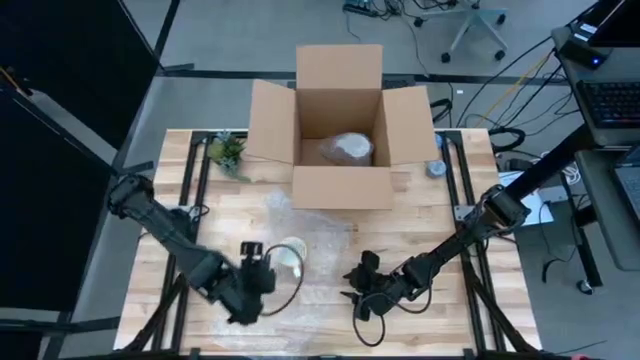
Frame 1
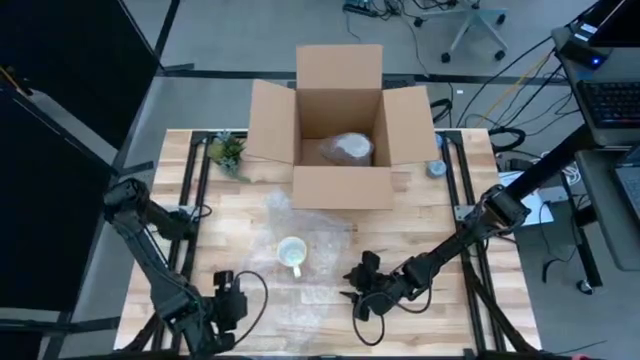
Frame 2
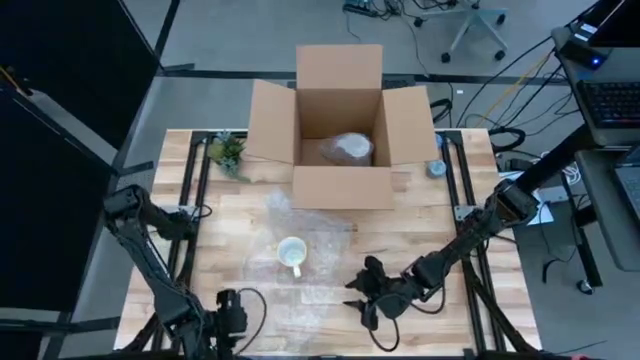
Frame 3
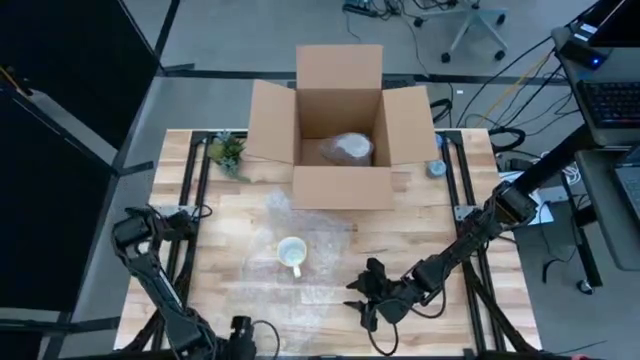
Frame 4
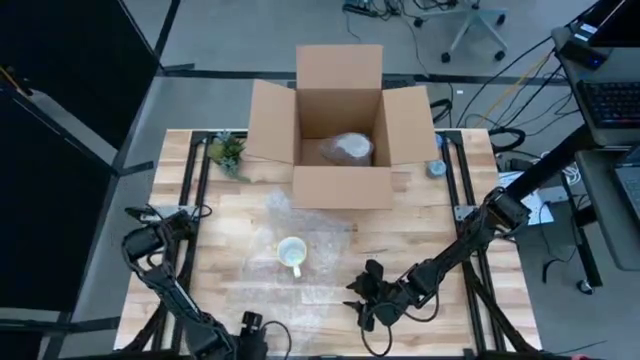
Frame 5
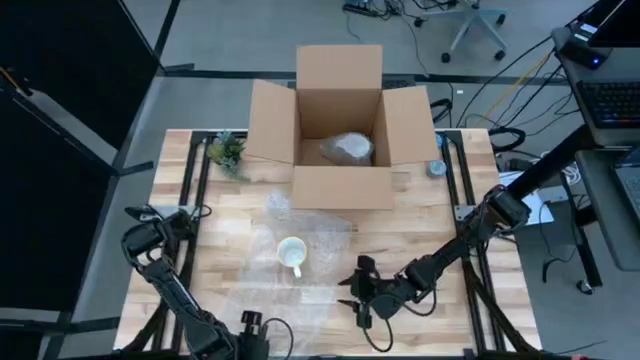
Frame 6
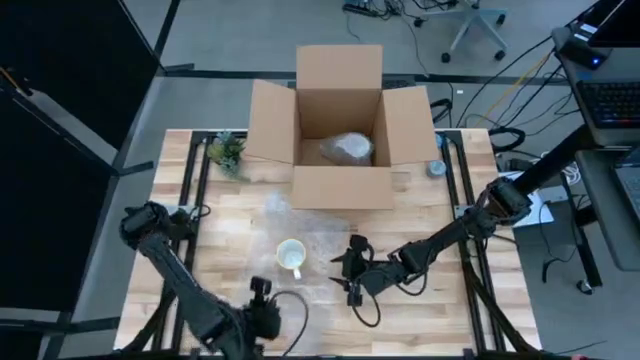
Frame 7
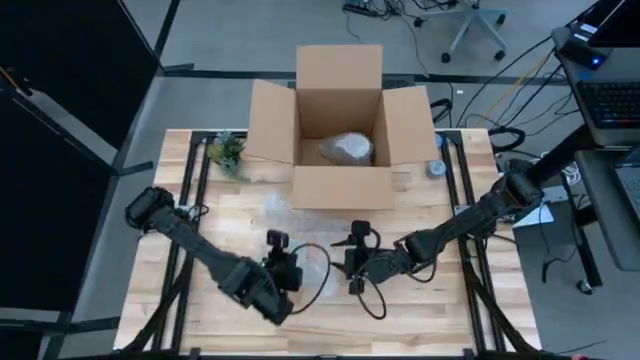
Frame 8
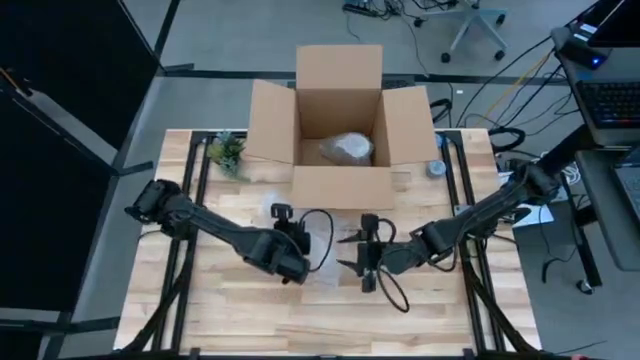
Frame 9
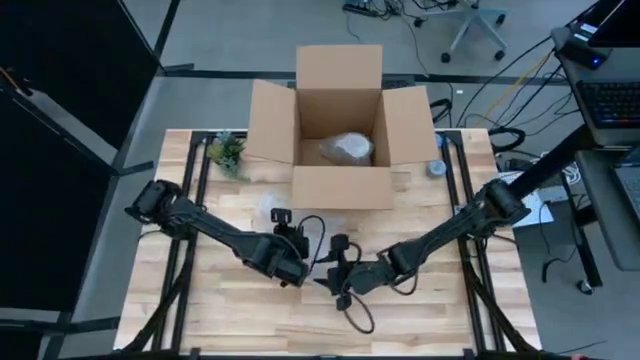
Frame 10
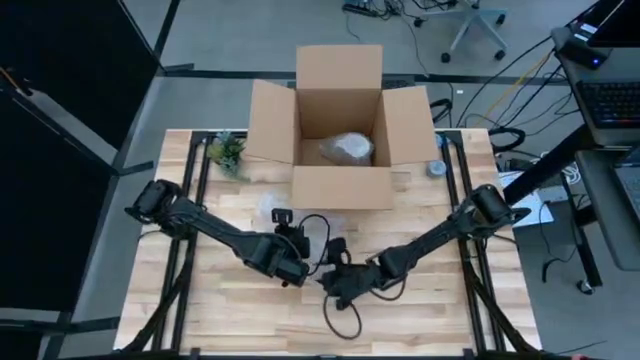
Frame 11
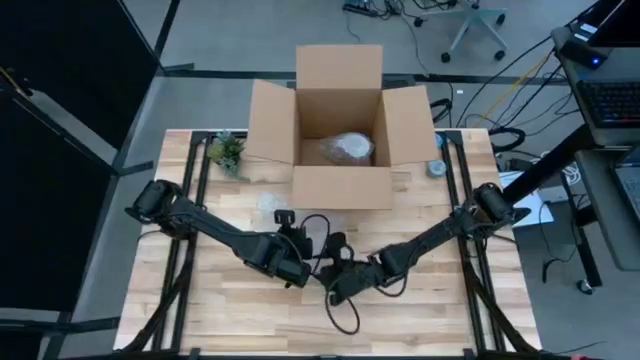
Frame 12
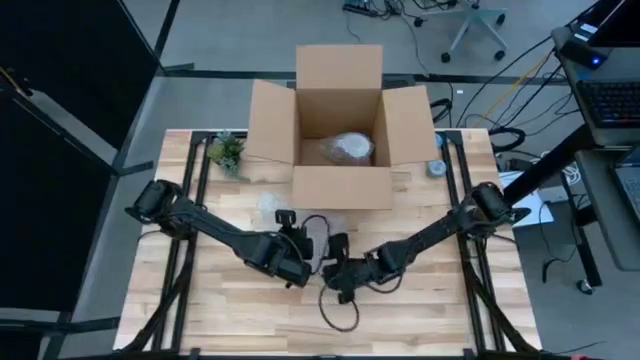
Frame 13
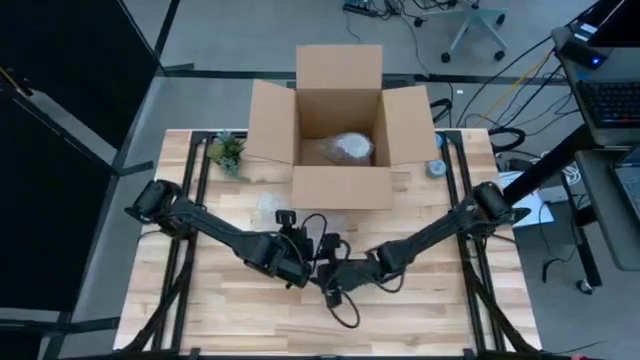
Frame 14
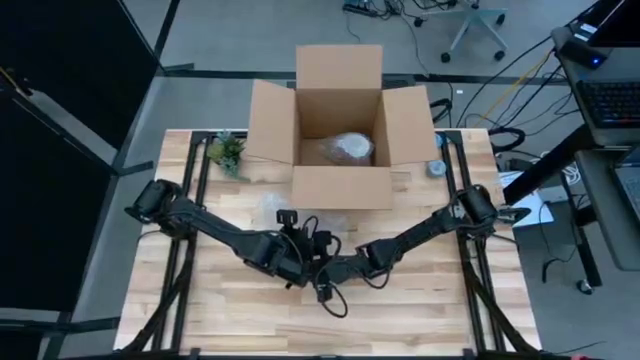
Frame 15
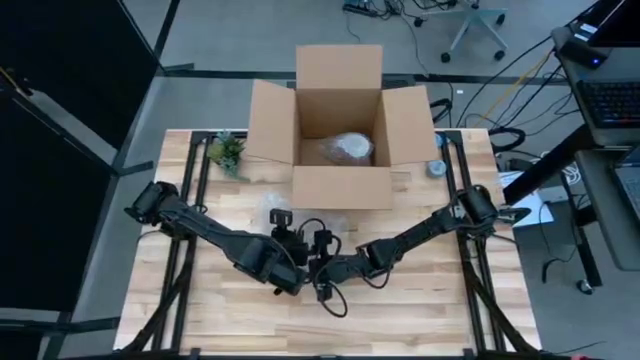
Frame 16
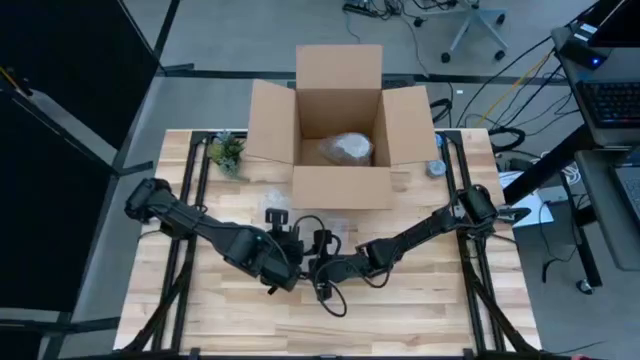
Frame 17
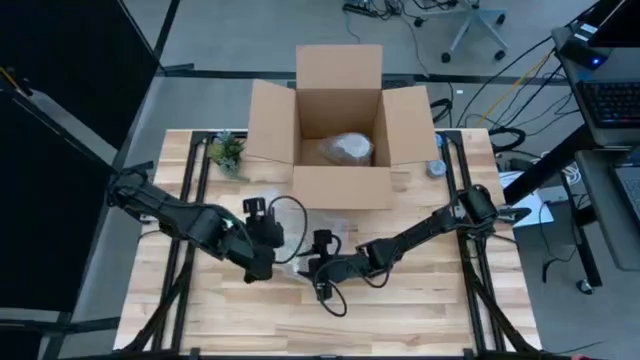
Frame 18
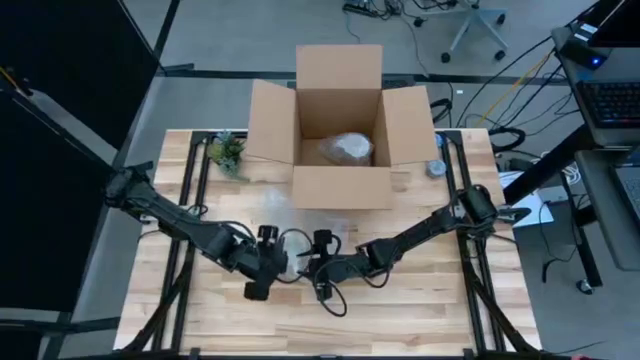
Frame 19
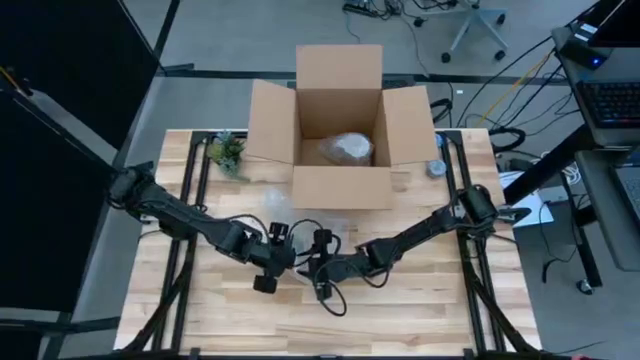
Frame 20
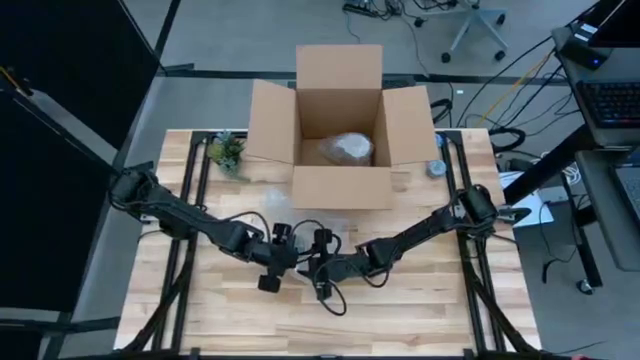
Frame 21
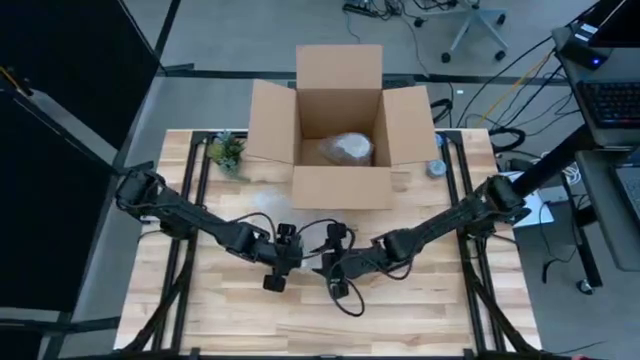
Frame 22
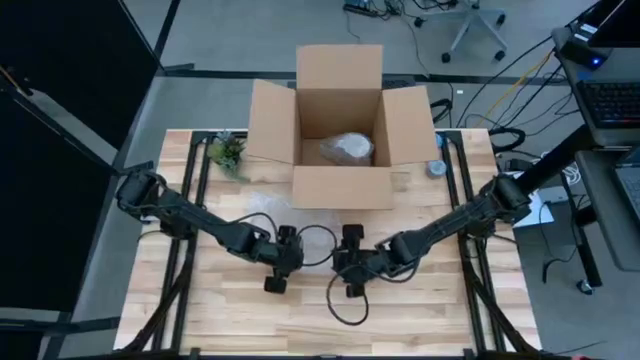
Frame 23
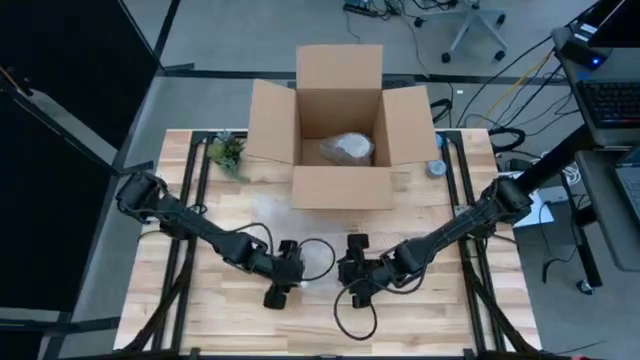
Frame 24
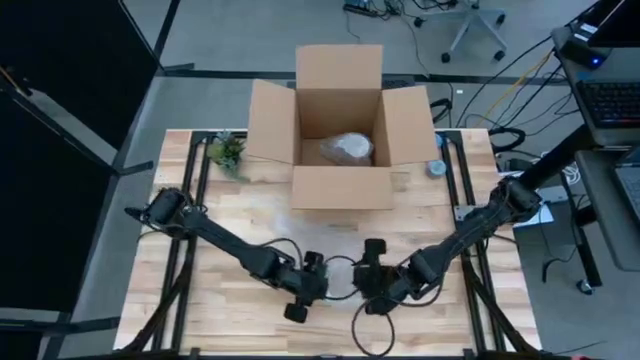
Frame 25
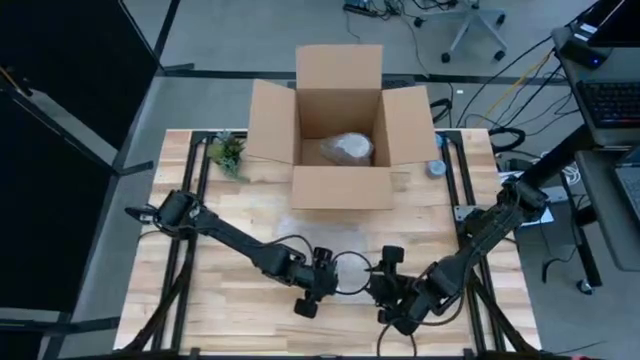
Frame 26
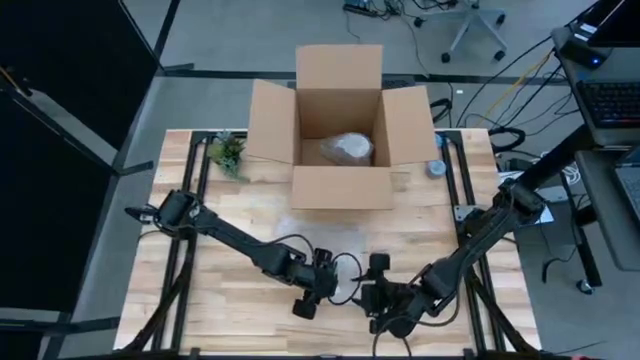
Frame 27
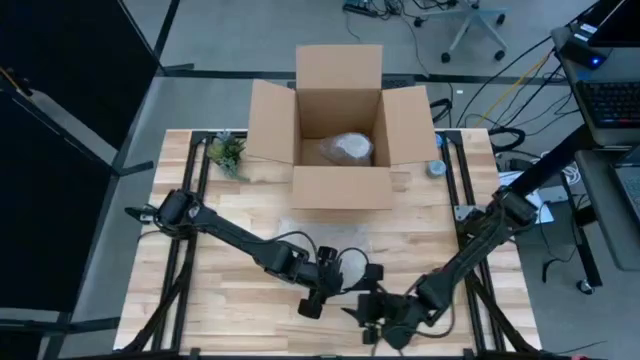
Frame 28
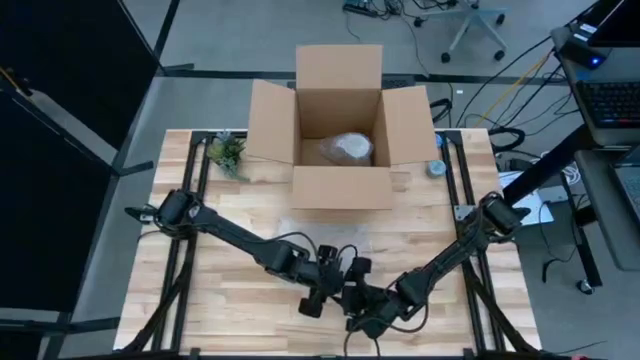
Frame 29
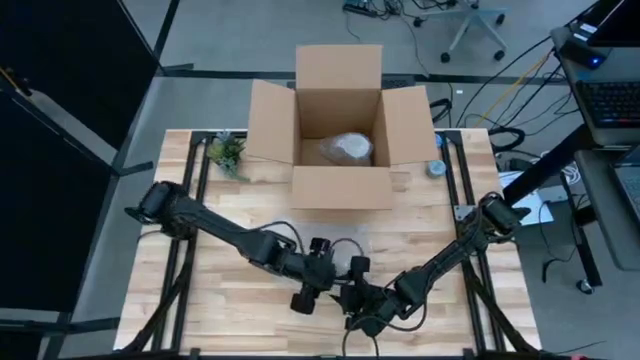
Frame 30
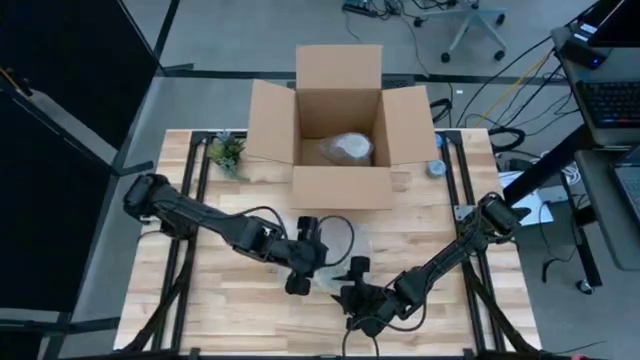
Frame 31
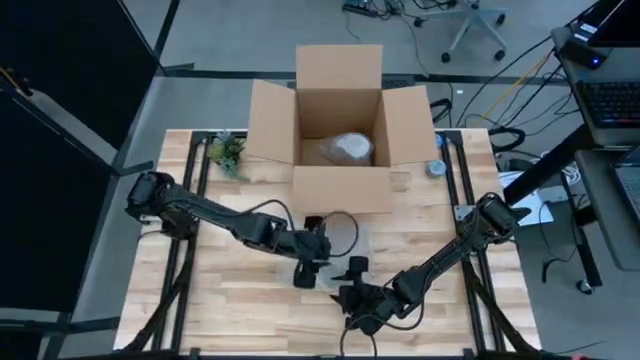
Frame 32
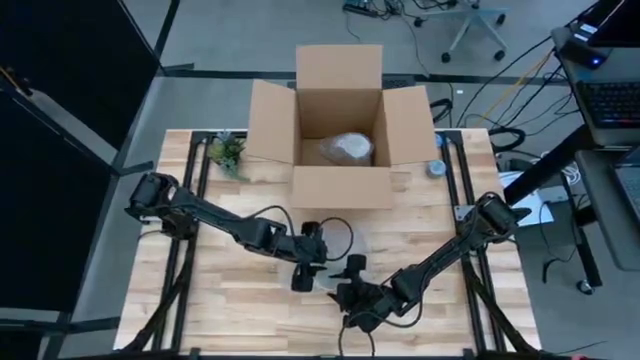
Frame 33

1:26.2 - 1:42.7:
Task: wrap mug
Wrap the orange mug with bubble wrap

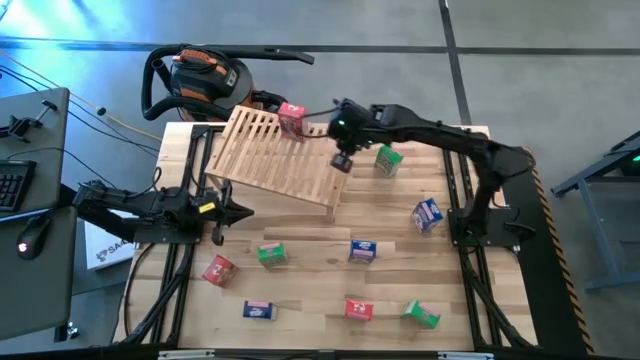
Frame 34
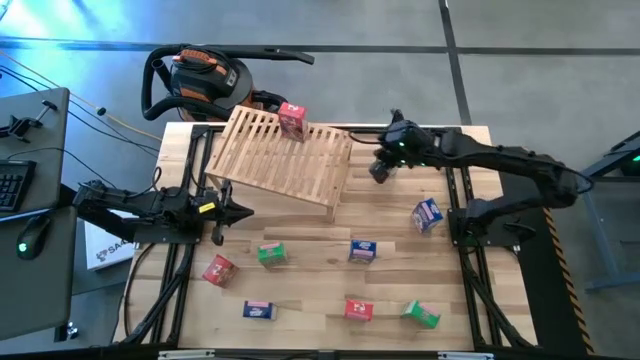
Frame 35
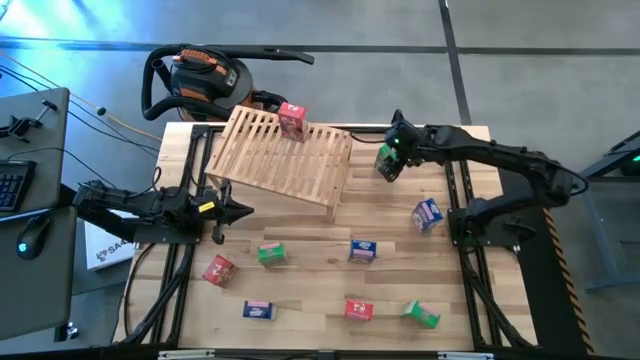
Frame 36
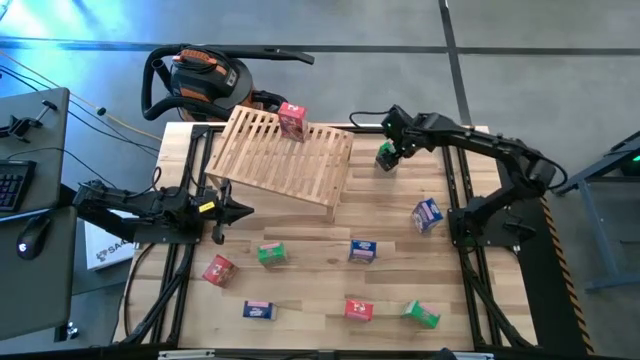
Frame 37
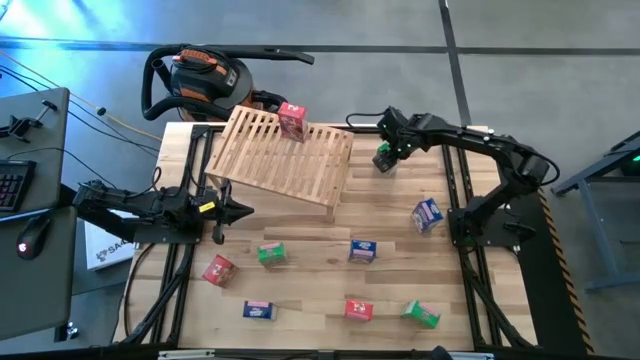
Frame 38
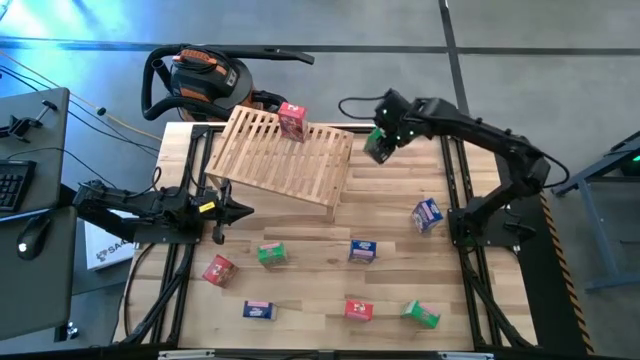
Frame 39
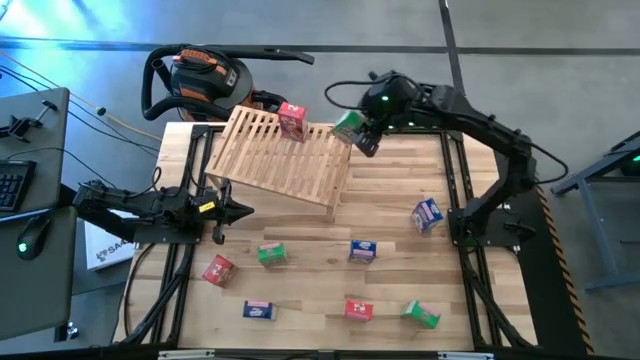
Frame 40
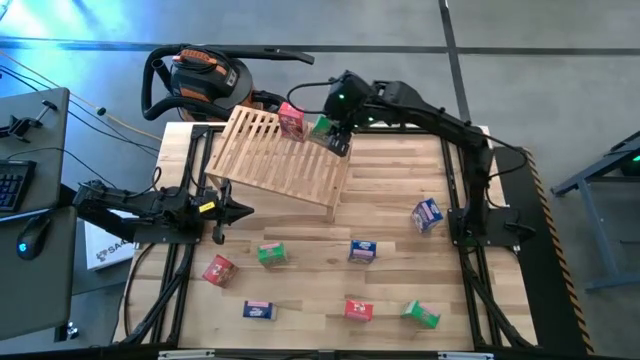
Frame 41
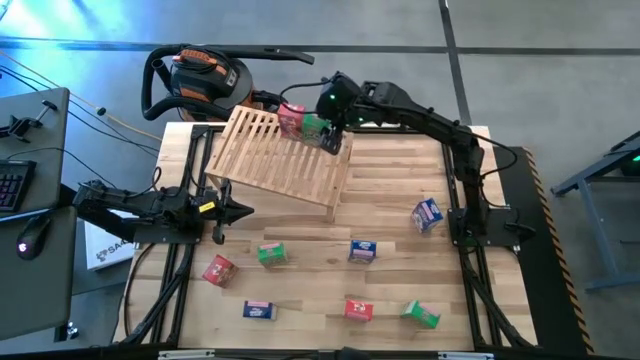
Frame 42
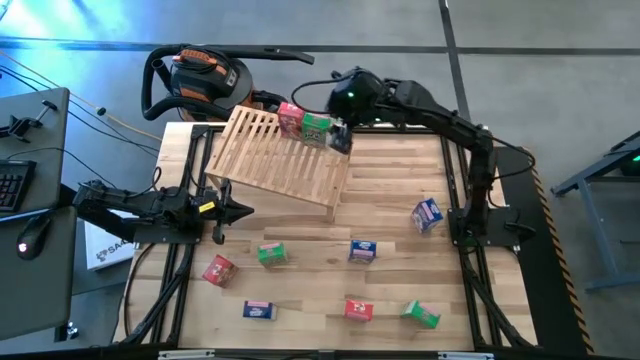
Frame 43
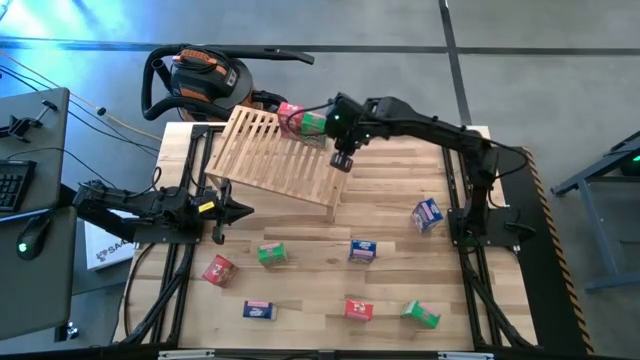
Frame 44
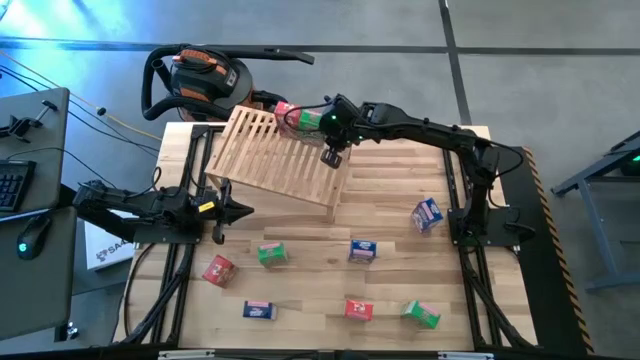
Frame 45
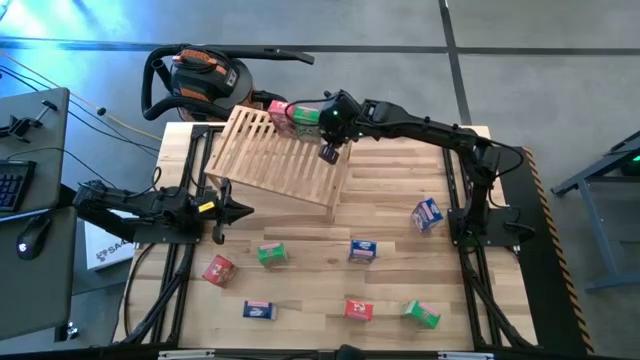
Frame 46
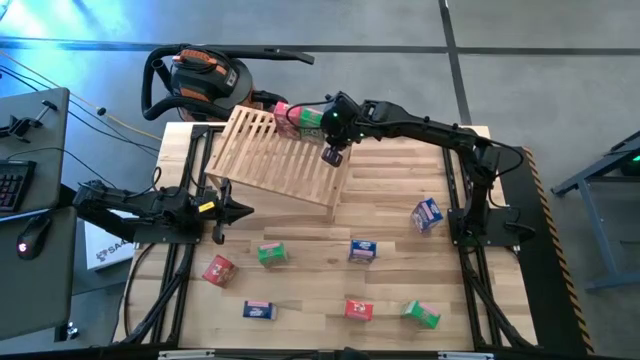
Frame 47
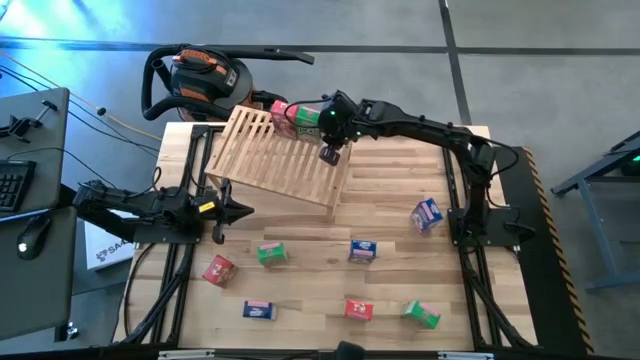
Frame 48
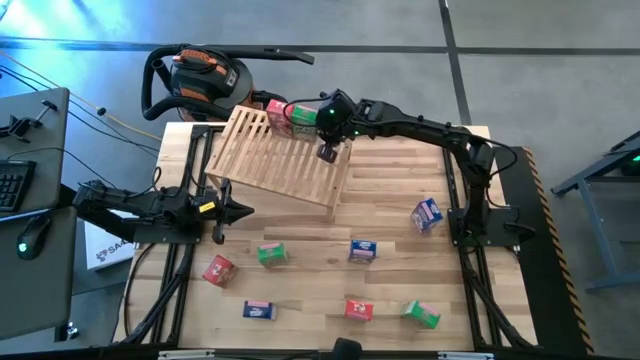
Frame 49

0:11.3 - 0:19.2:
Task: Stack cereal on shelf
Put the top green cereal box on the shelf
